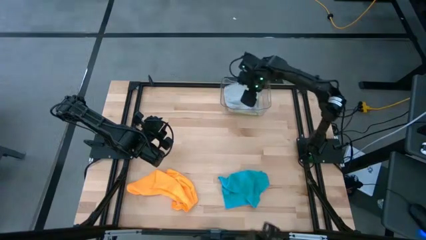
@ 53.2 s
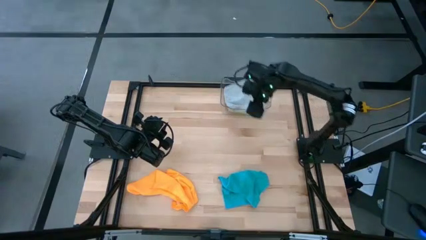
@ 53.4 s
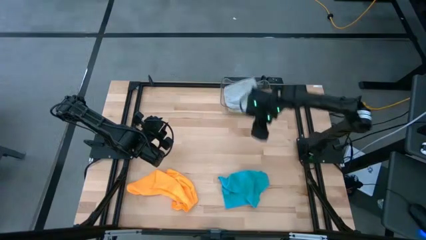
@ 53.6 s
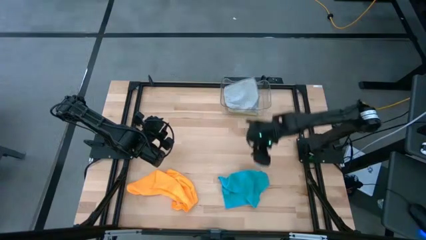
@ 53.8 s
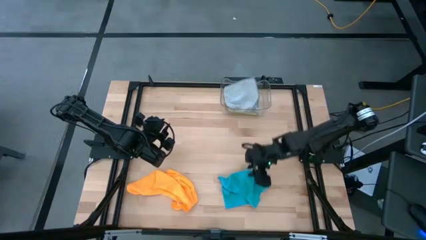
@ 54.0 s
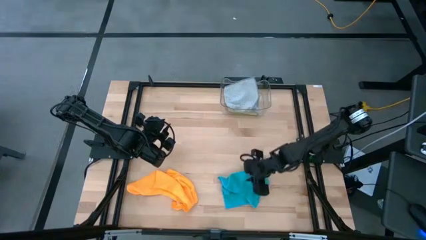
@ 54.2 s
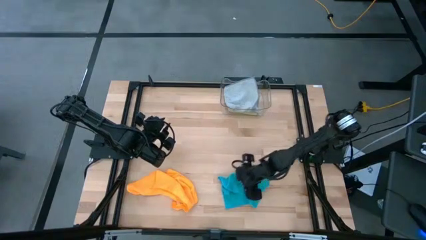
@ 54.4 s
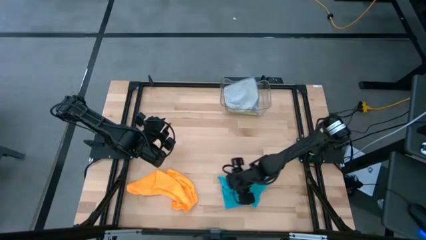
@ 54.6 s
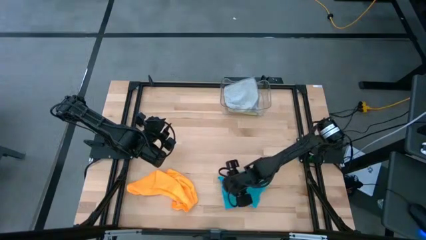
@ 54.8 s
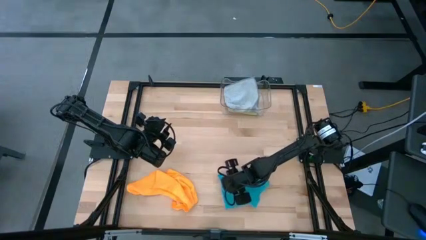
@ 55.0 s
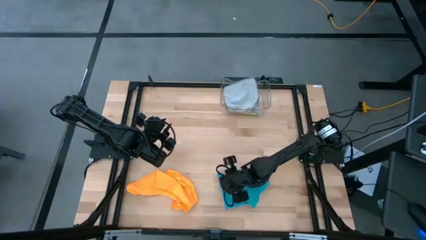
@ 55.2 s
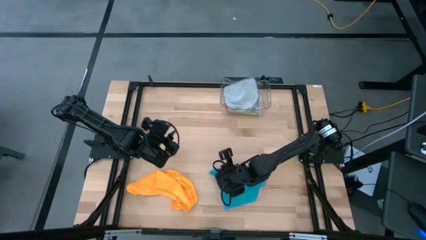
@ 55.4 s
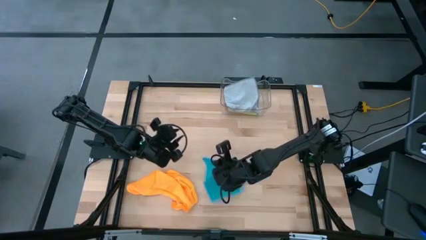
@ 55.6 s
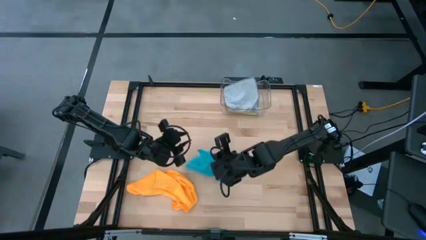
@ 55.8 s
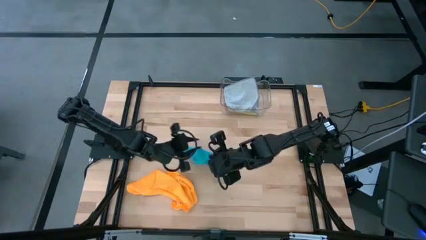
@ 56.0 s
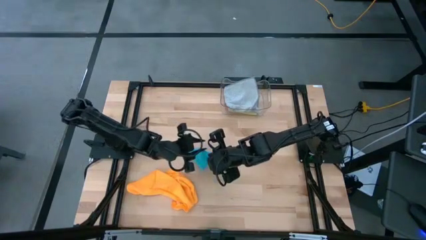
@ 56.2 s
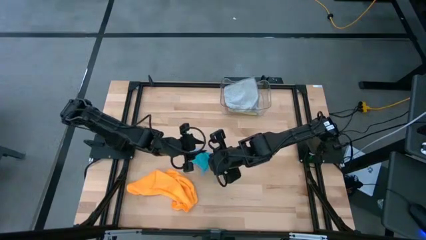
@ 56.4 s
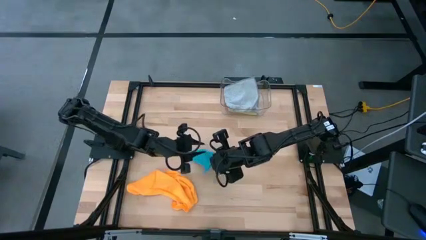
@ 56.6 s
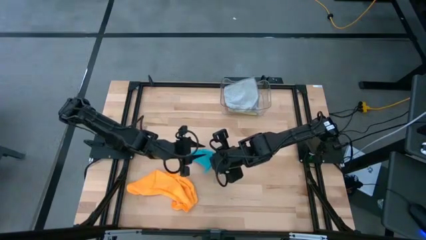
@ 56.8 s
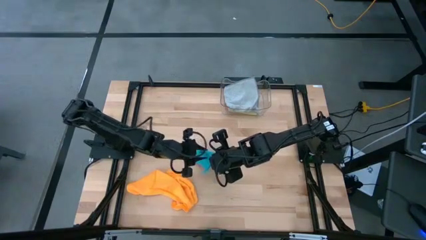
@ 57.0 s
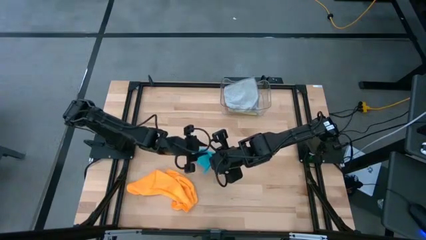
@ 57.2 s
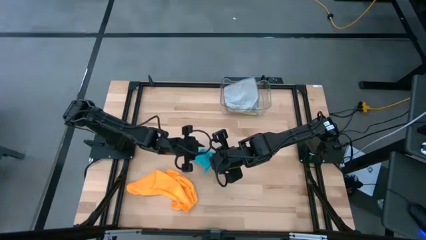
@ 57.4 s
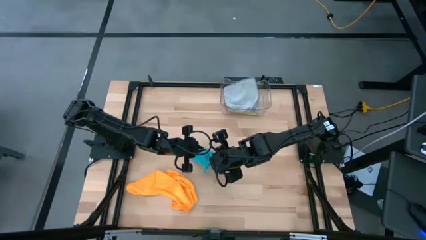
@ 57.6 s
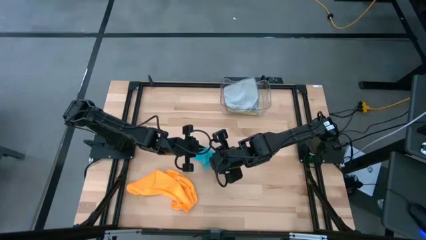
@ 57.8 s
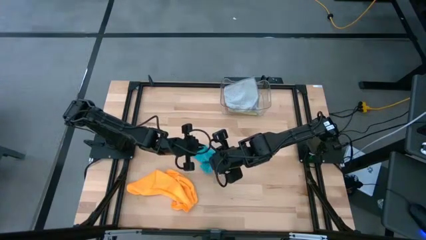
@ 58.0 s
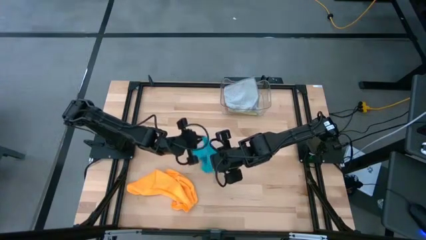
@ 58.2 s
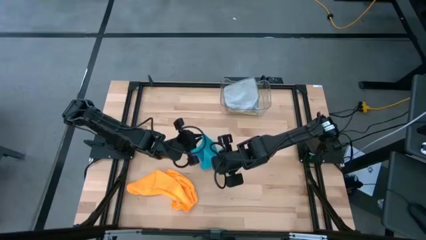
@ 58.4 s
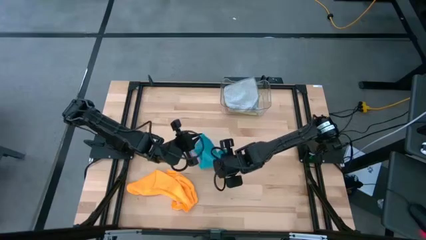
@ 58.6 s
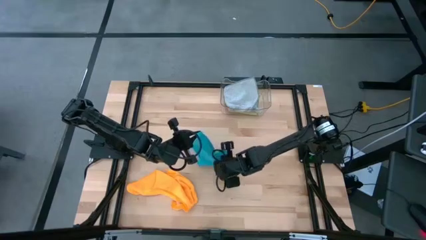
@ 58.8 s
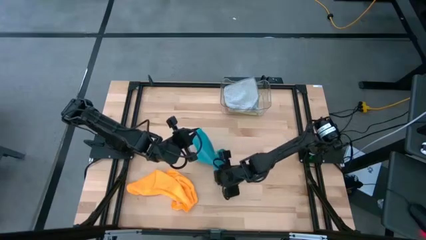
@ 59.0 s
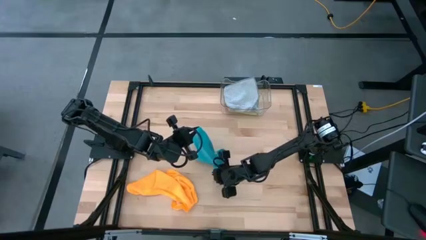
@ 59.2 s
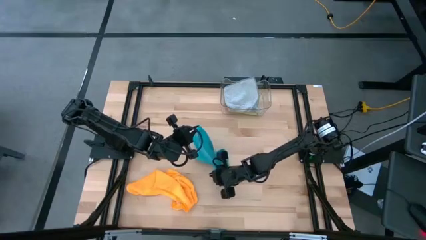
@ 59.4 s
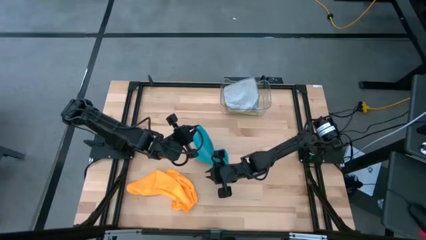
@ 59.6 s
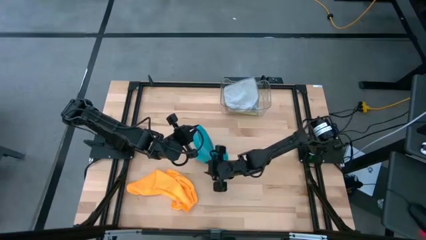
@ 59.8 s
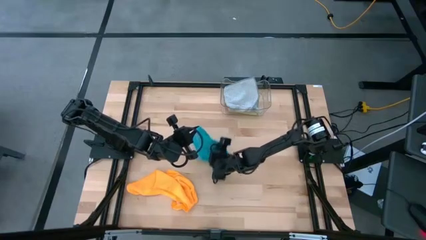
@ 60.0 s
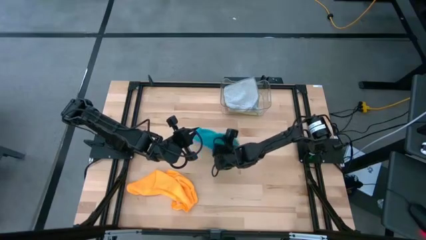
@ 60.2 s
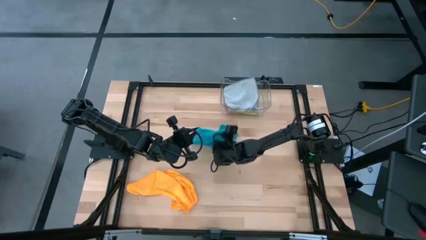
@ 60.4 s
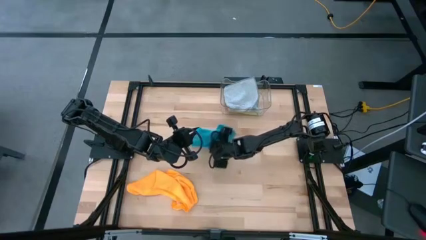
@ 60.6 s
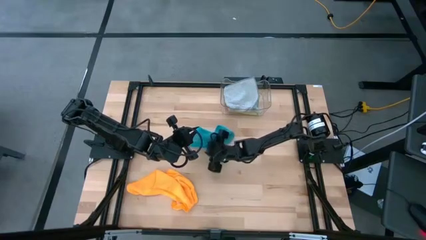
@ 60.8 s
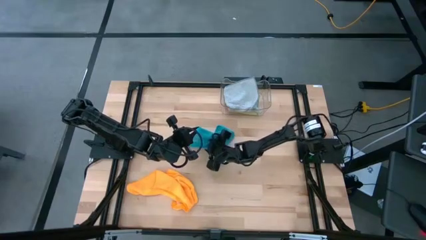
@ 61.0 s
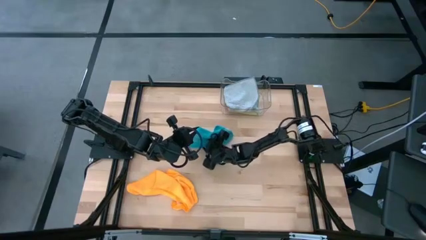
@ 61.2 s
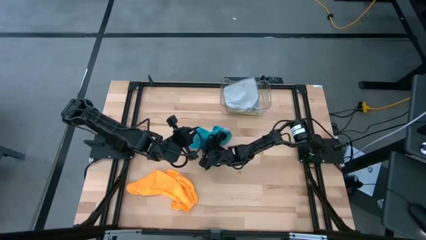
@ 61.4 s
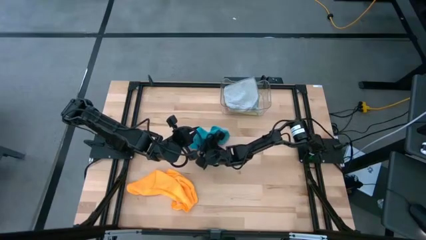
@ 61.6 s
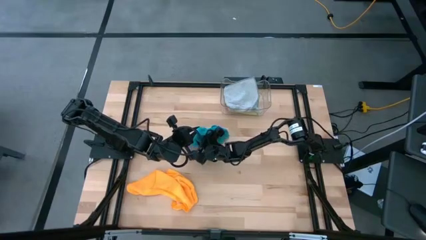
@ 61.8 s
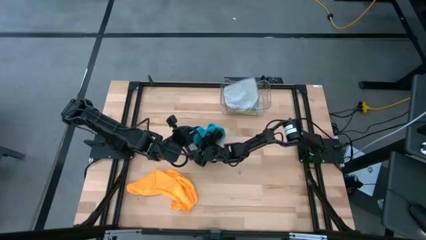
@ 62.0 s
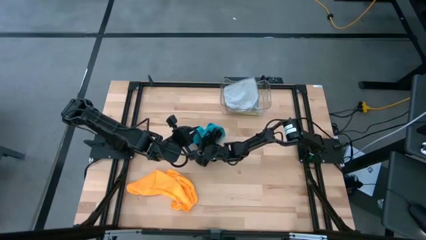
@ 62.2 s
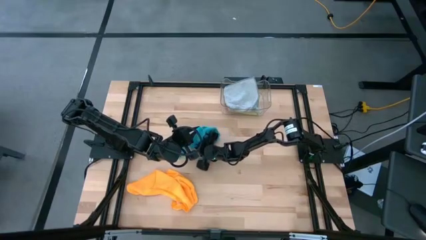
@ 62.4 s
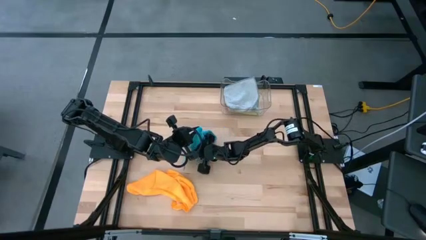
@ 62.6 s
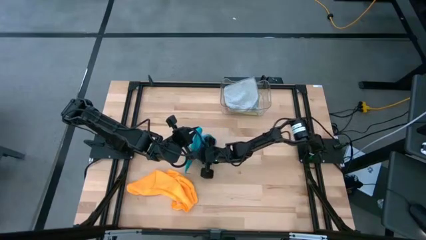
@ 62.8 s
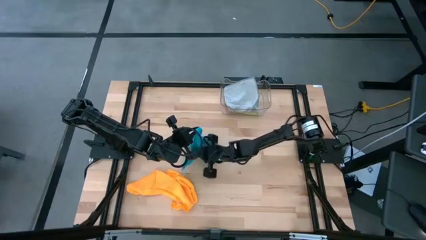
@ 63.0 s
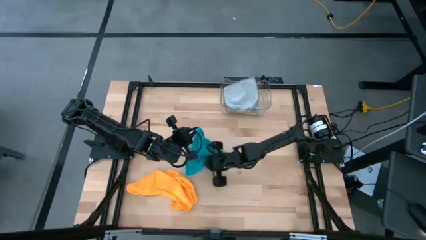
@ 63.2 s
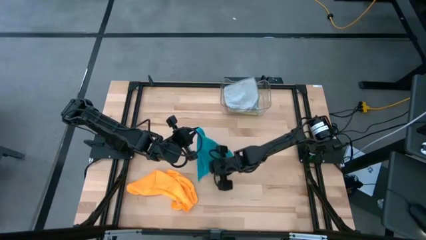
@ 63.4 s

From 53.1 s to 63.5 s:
Task: Fold microfiber towels
Fold the blue microfiber towel
